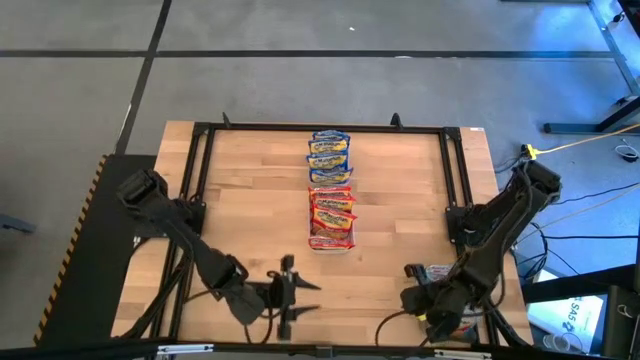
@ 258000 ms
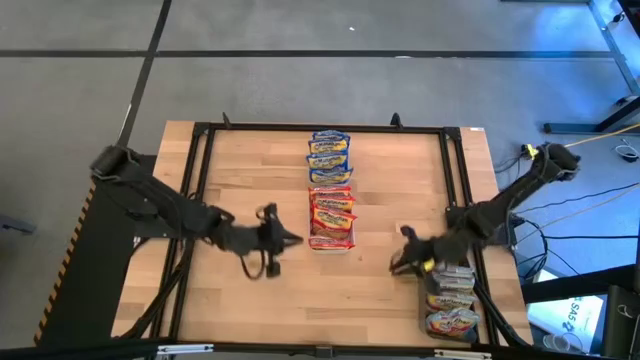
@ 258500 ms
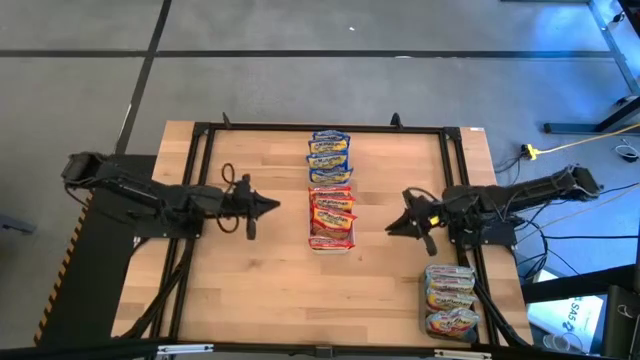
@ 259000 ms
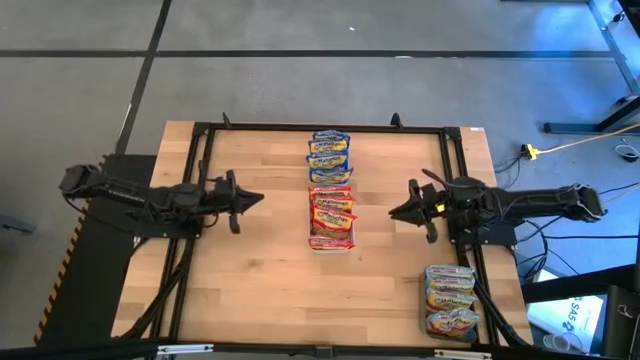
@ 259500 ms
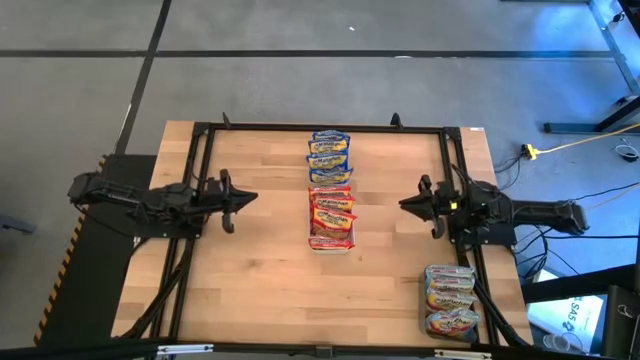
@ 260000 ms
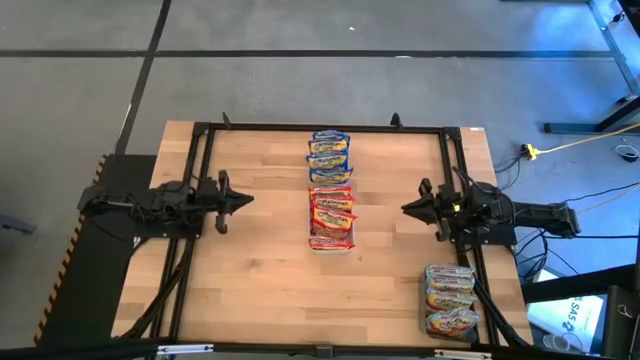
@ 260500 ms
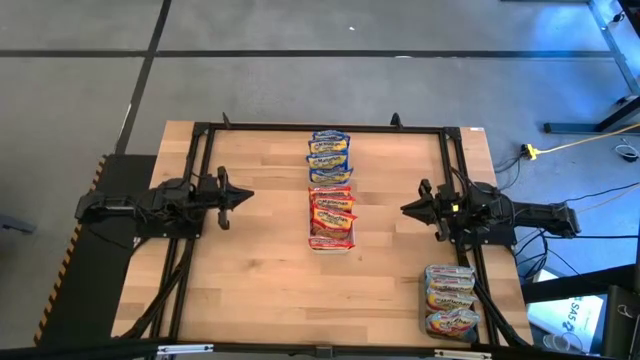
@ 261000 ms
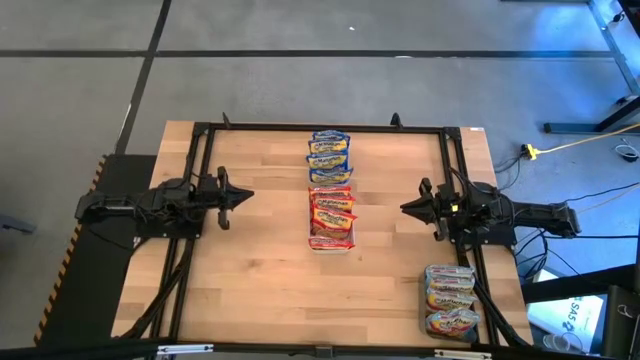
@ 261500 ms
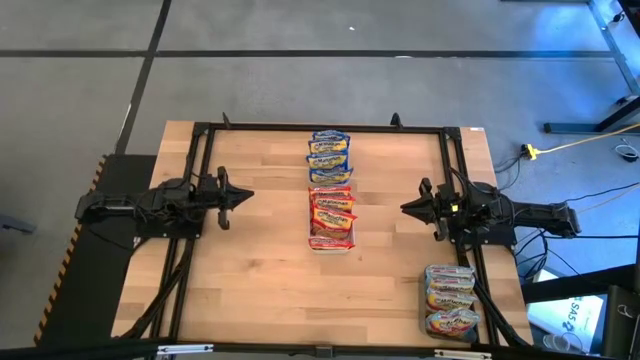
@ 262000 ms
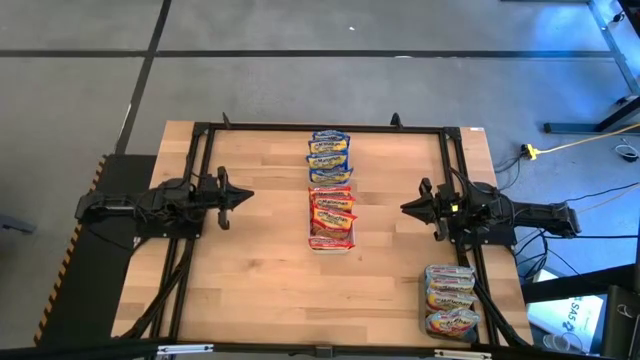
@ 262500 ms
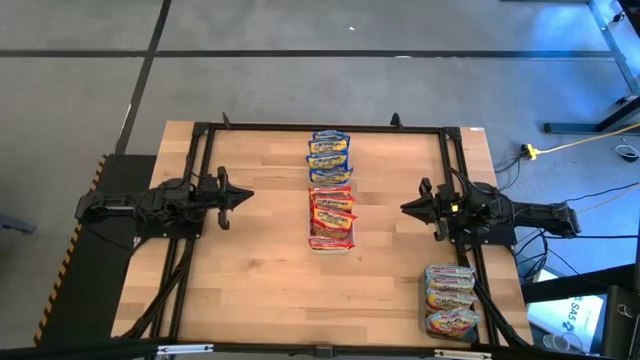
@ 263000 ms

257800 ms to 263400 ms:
Task: Sort Maruchan noodles
Return to Home Position

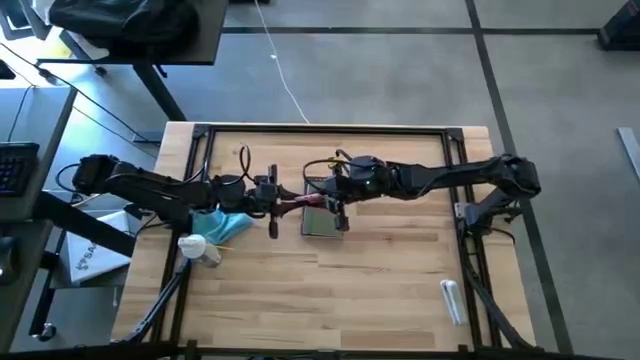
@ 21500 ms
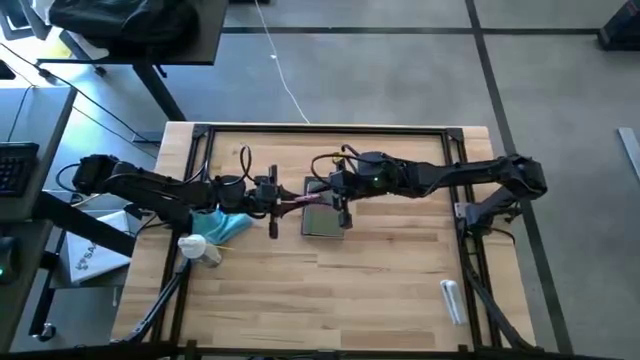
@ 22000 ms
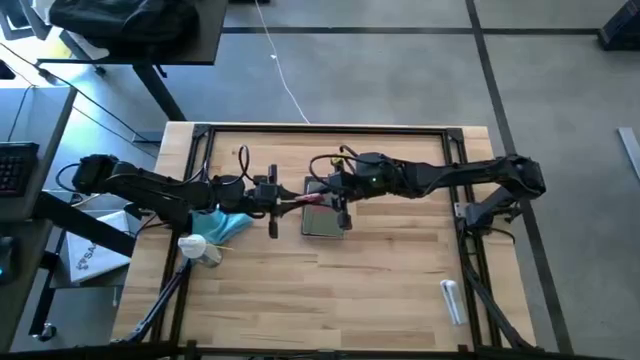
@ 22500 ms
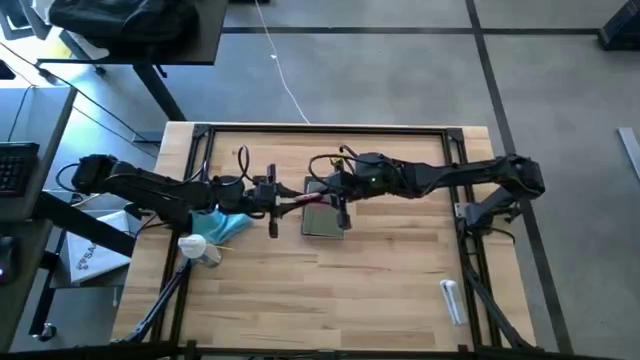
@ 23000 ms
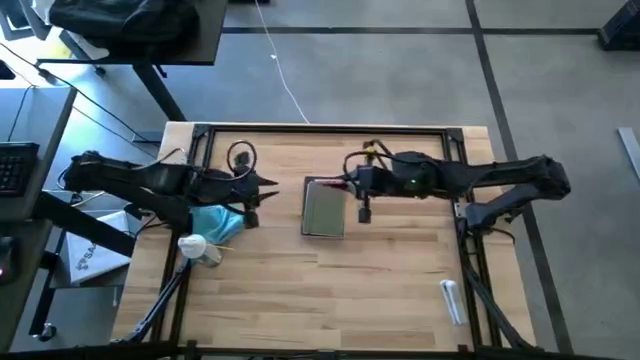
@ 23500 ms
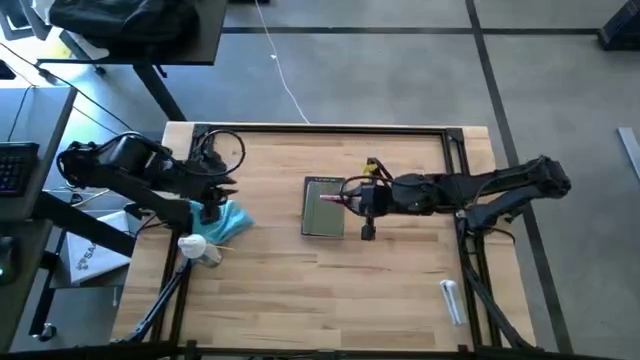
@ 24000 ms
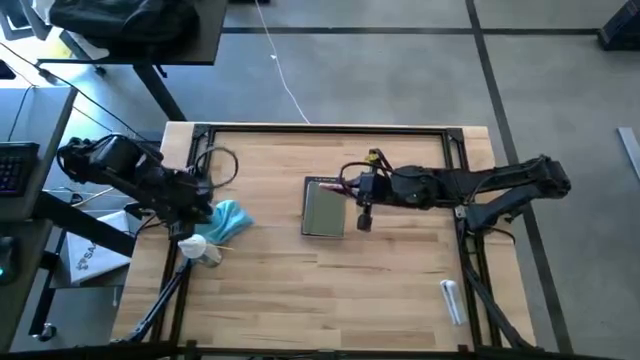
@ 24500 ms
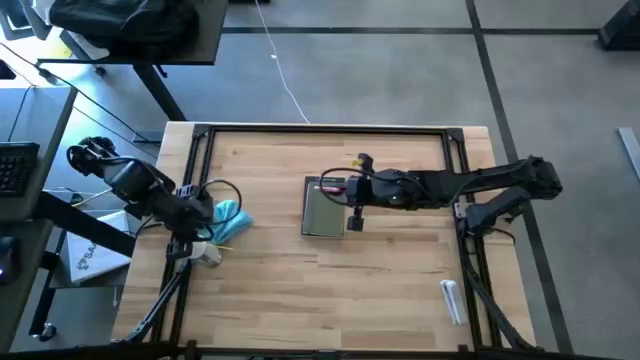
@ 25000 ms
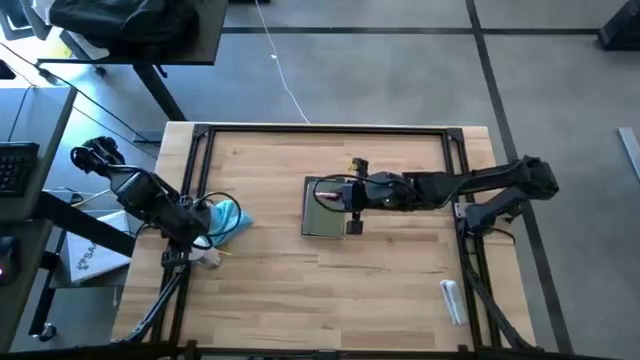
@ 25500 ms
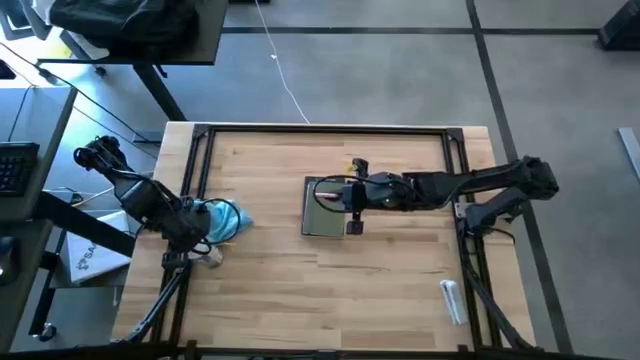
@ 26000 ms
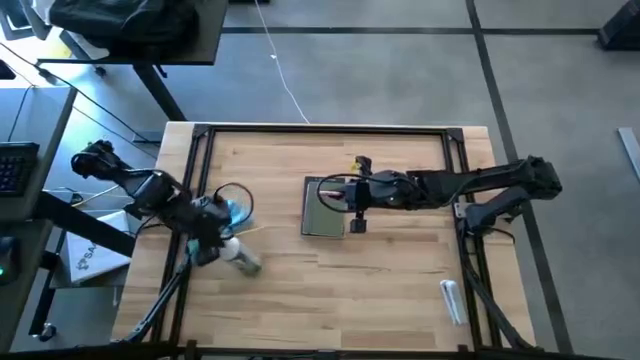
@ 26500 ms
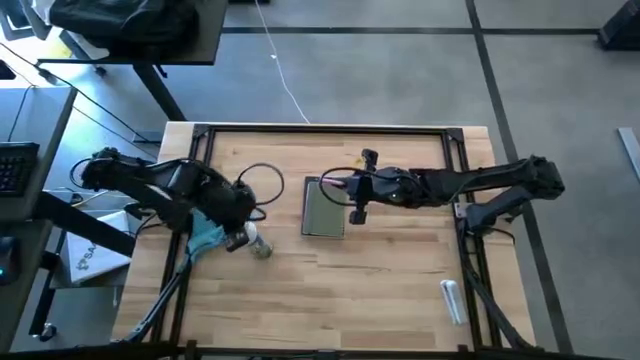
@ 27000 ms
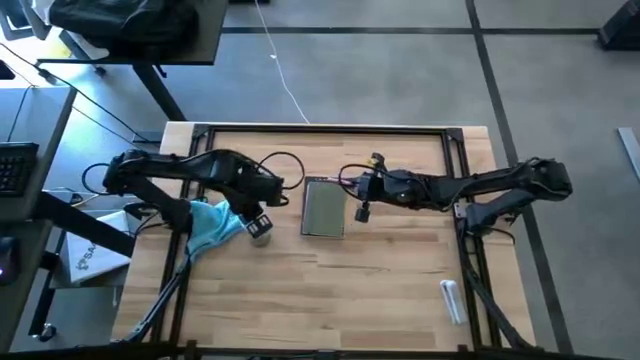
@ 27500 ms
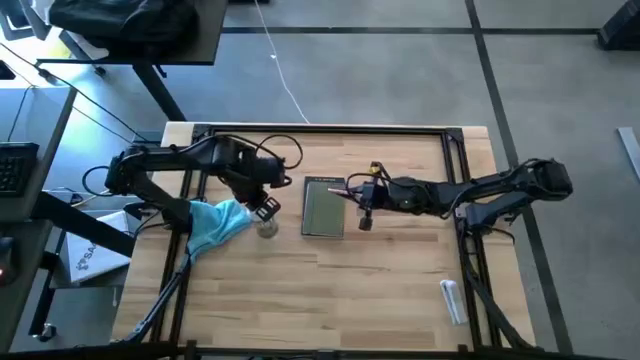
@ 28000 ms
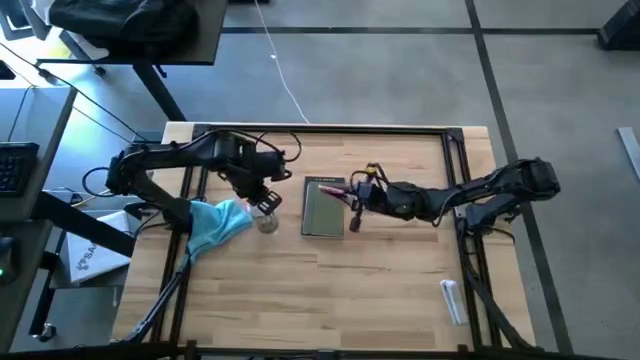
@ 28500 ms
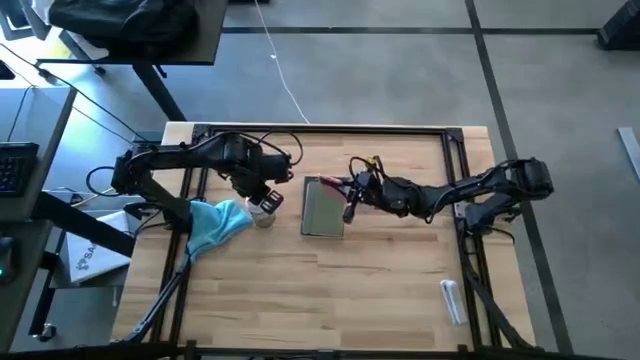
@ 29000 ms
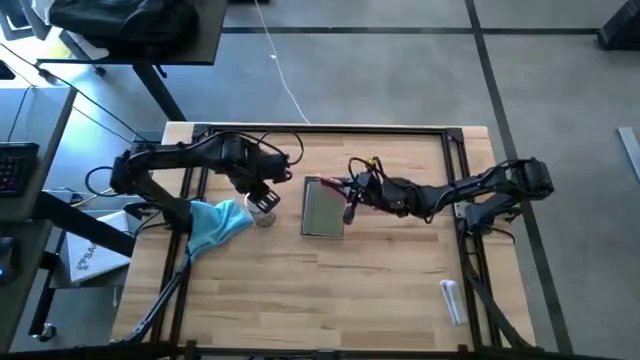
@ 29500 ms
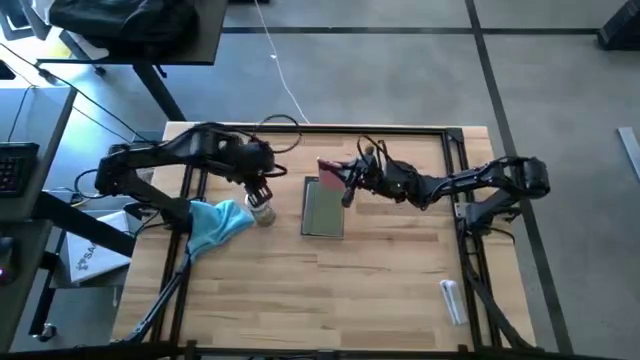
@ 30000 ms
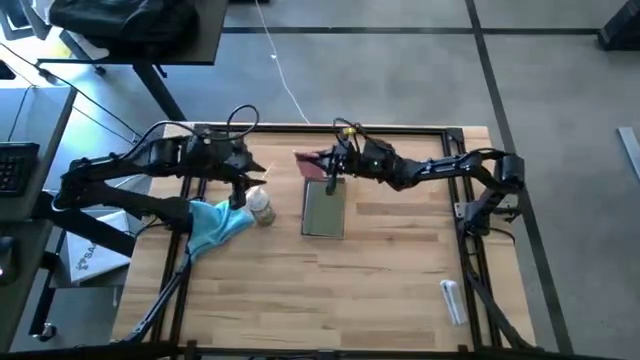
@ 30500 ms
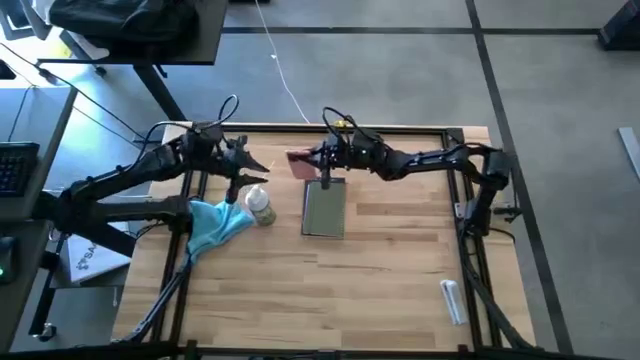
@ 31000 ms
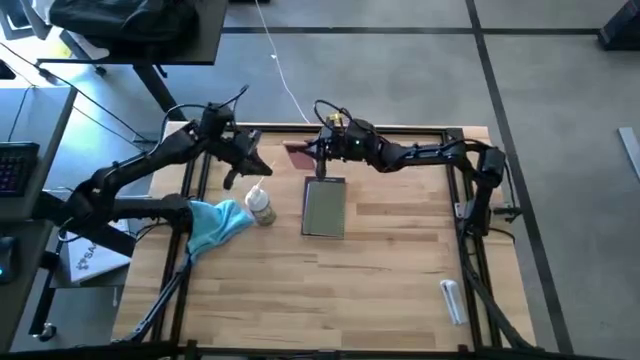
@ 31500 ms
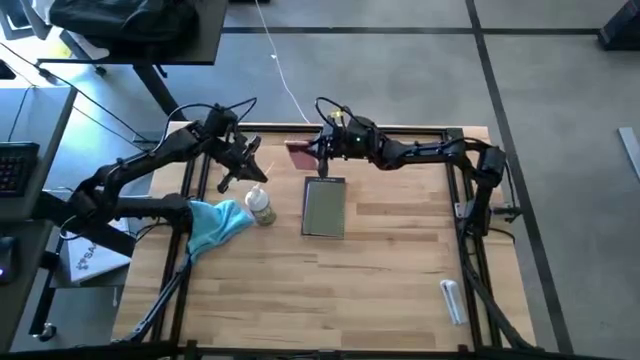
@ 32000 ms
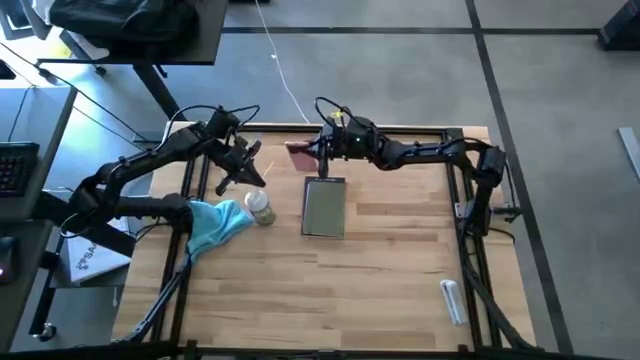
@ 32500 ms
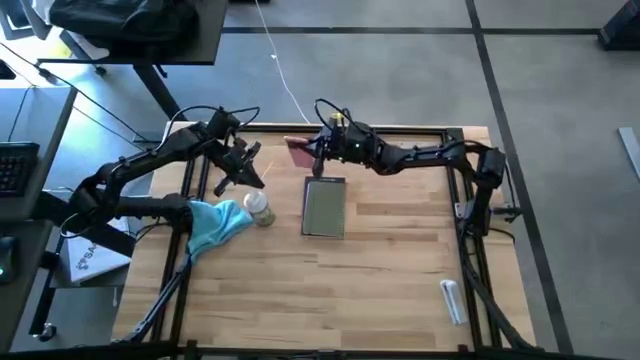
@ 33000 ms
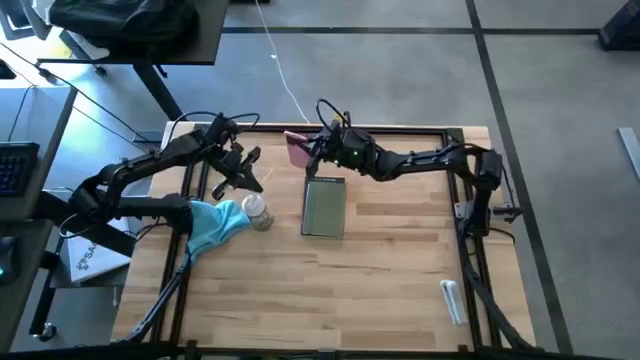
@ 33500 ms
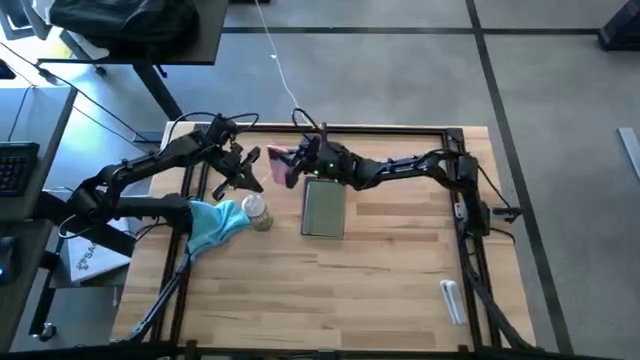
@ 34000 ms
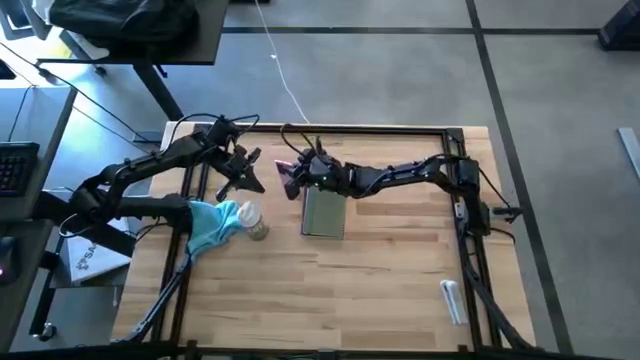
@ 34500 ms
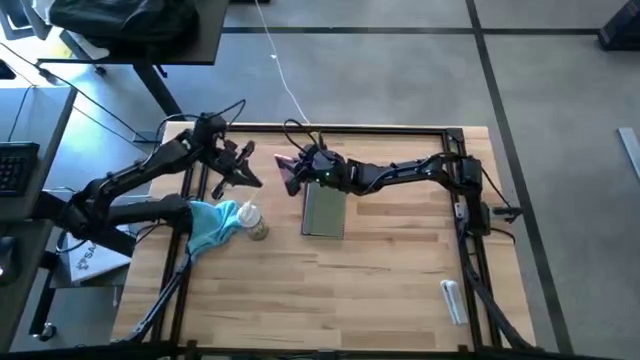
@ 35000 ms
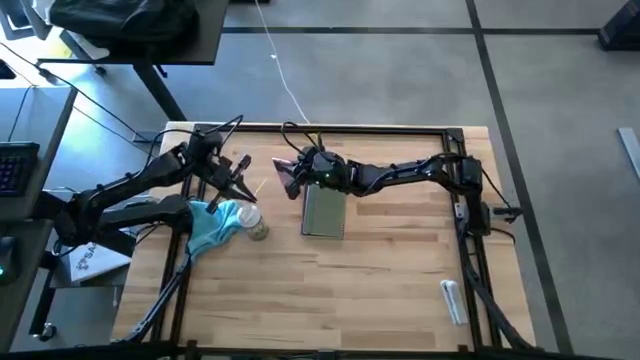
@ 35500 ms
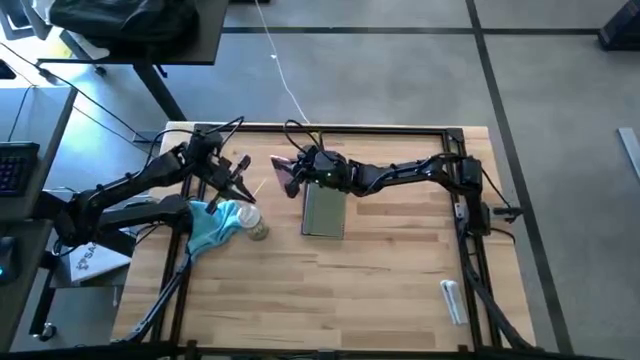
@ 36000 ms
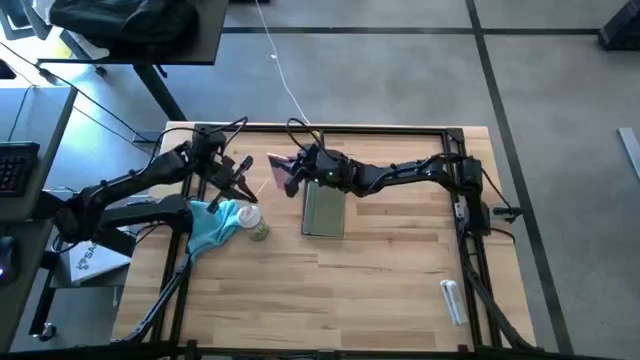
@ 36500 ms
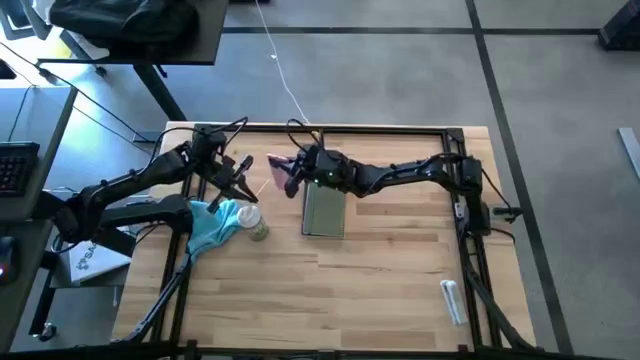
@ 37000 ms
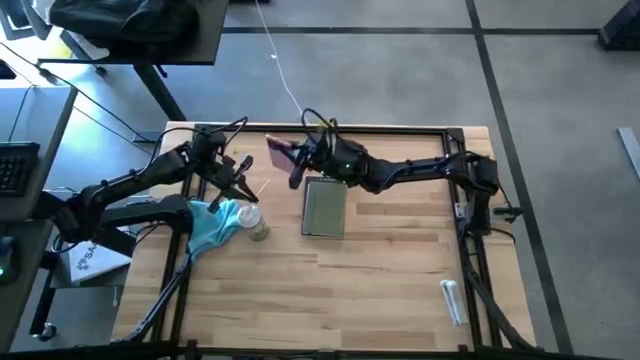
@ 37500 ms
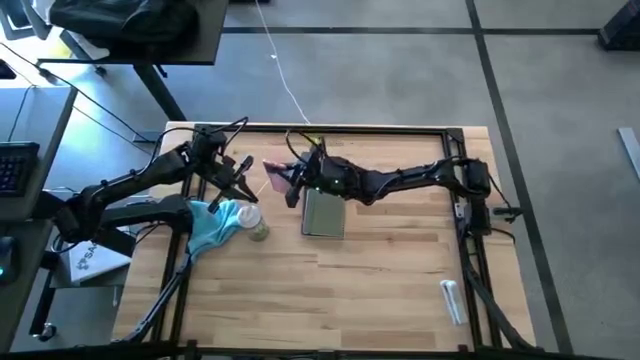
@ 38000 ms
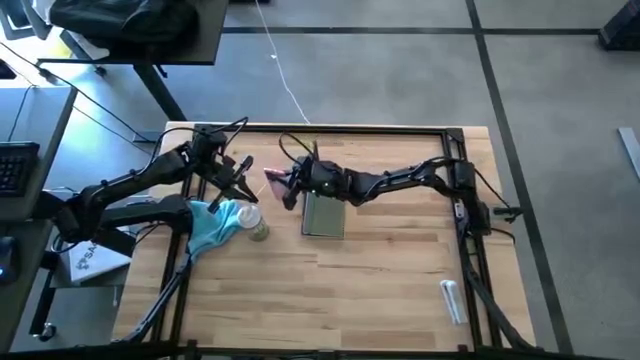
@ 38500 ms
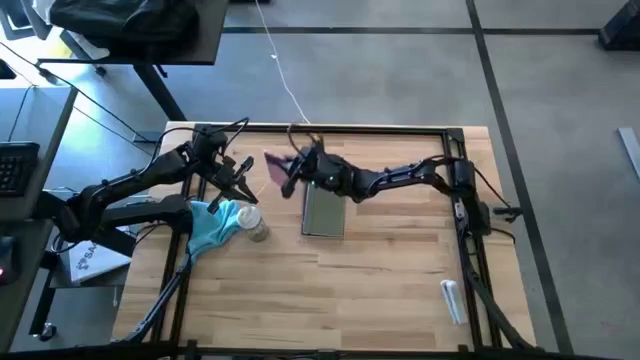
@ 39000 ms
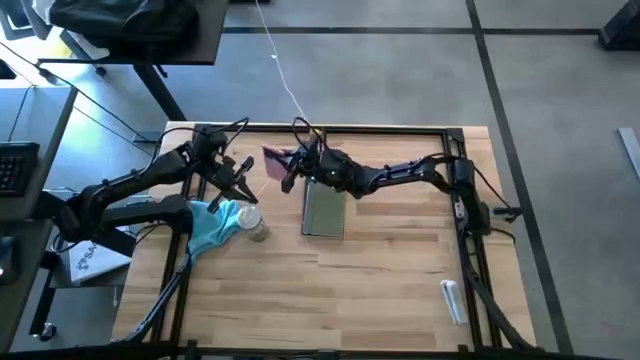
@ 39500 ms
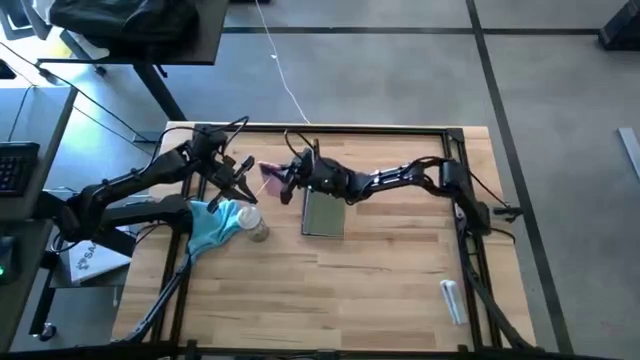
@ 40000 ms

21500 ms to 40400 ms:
Task: Apply microfiber cloth
Spray the cellphone using the spray bottle
